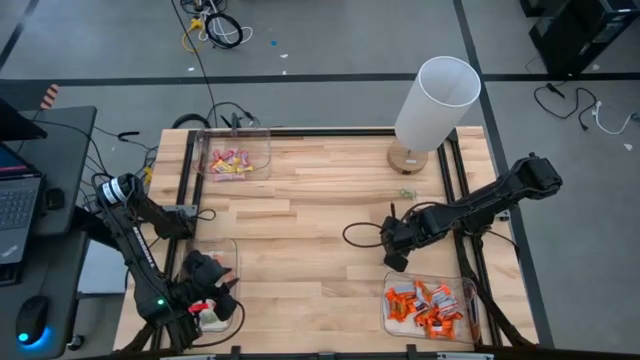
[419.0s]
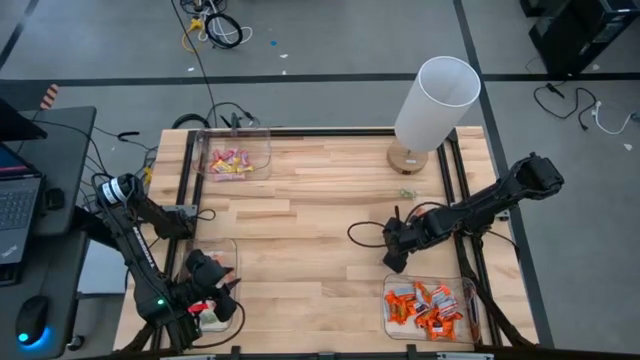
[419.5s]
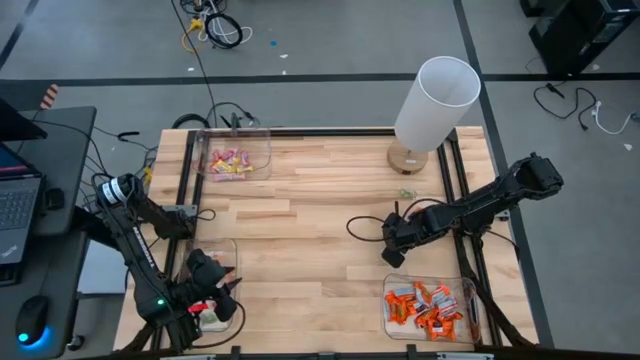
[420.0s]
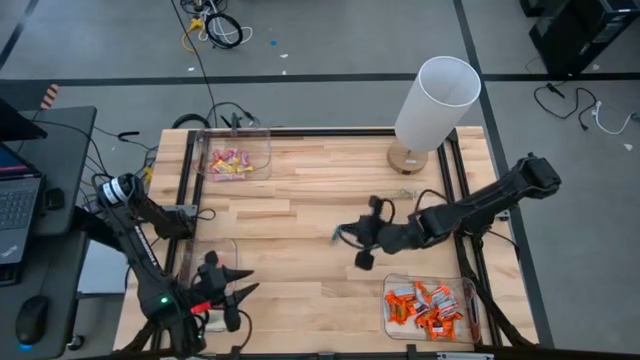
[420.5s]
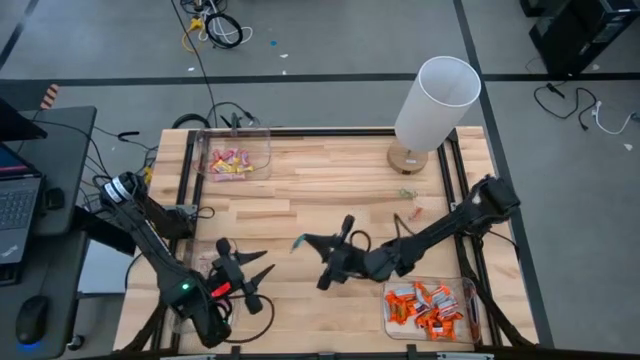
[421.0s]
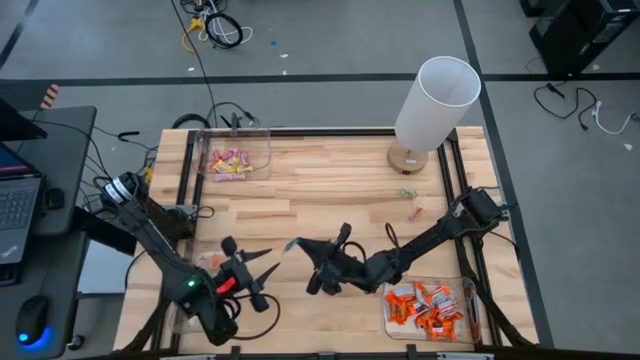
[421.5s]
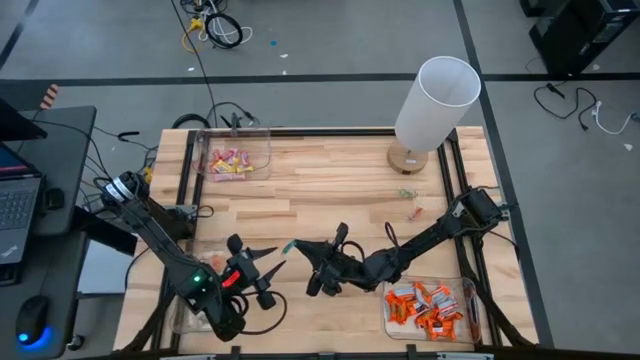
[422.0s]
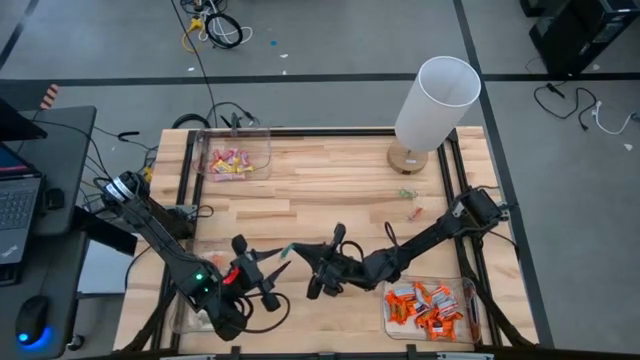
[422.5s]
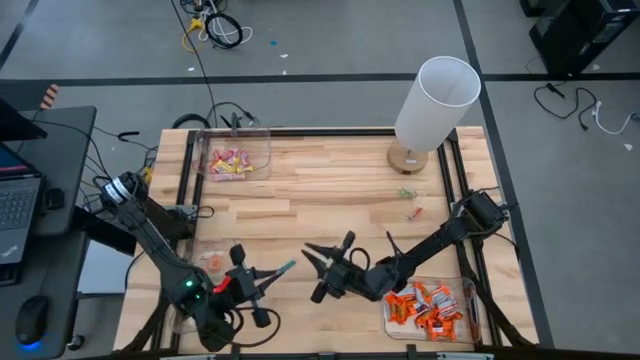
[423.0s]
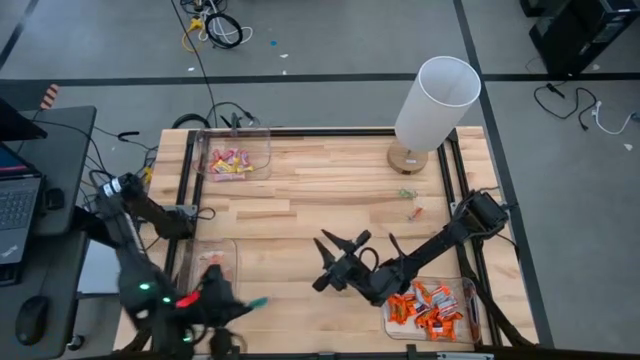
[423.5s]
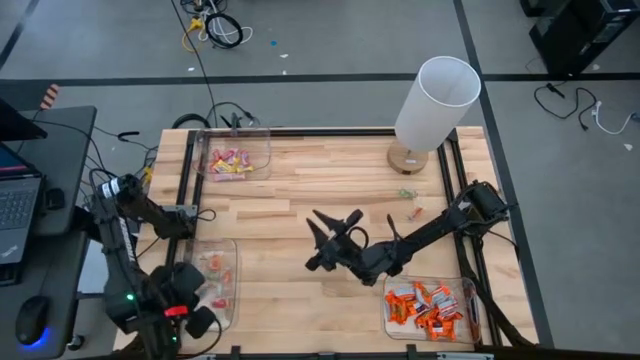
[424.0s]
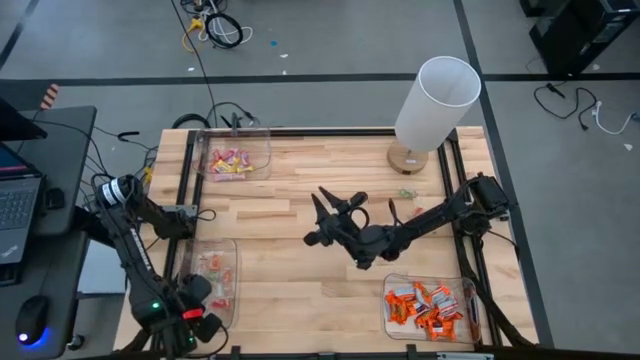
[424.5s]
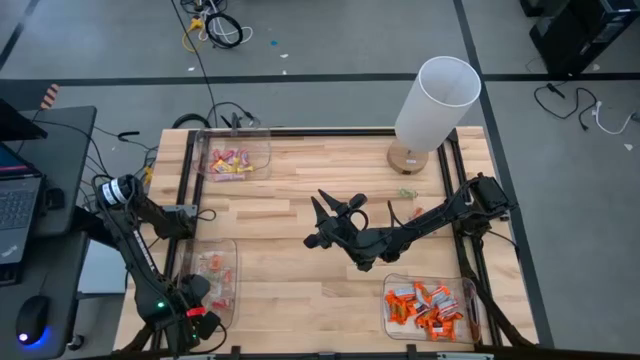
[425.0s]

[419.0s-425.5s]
Task: Sort candy
Put the blue gummy into the bottom left transparent bin

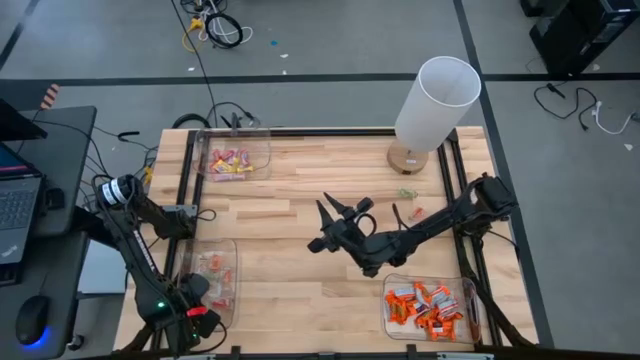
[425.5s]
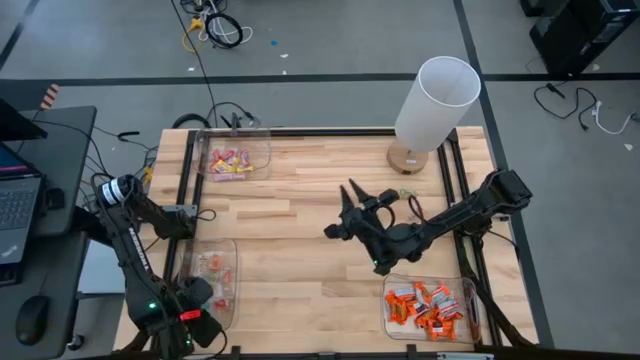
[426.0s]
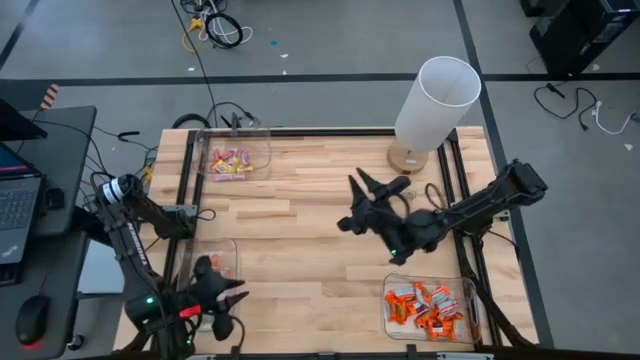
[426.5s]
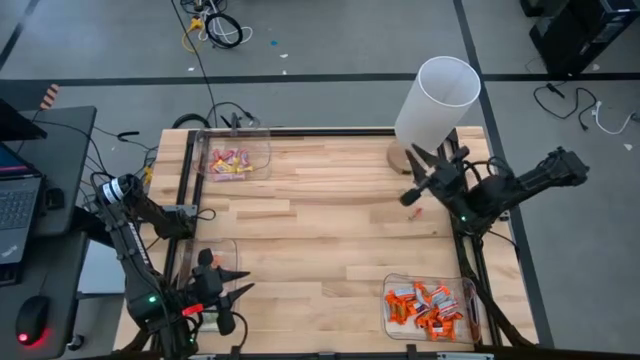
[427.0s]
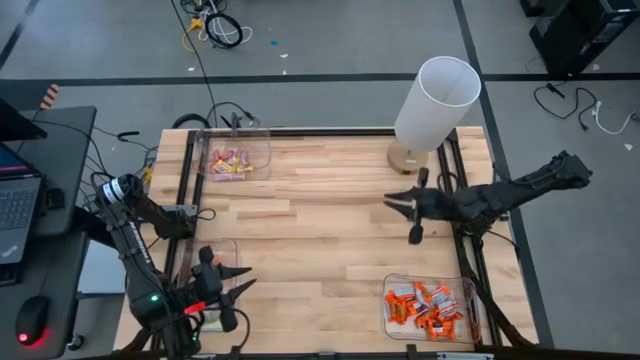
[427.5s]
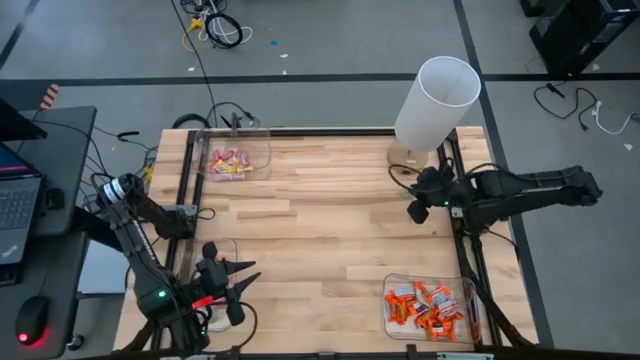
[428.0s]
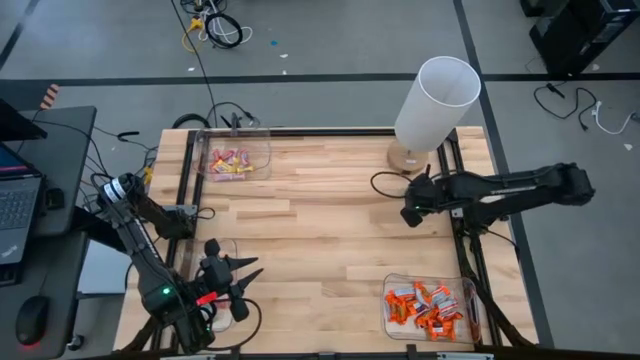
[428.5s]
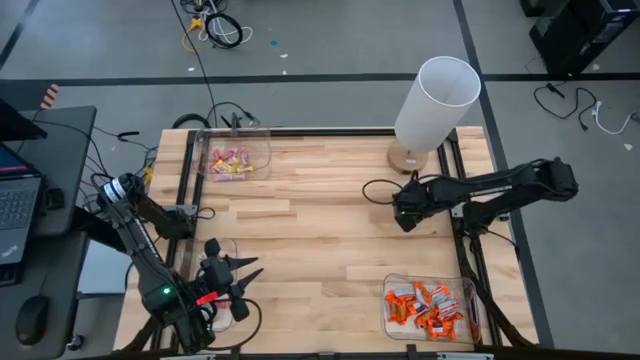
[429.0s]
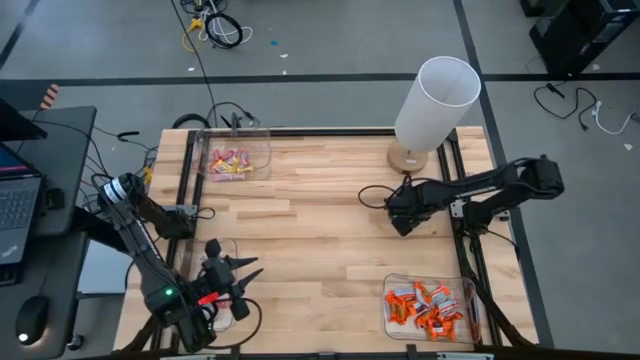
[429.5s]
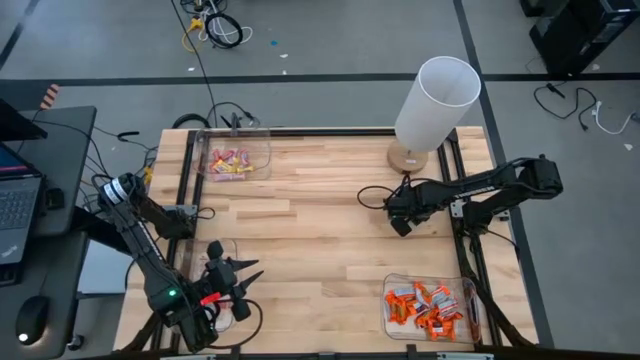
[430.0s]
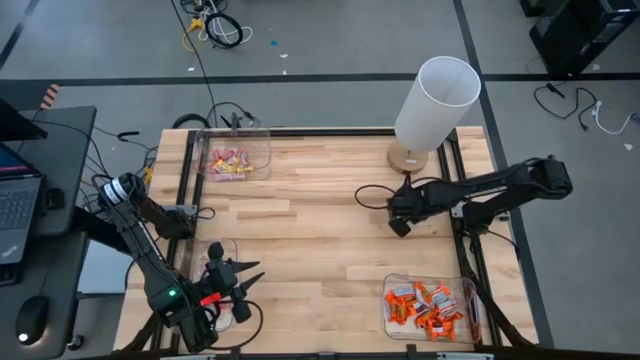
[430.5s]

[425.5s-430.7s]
Put the orange gummy into the bottom left transparent bin

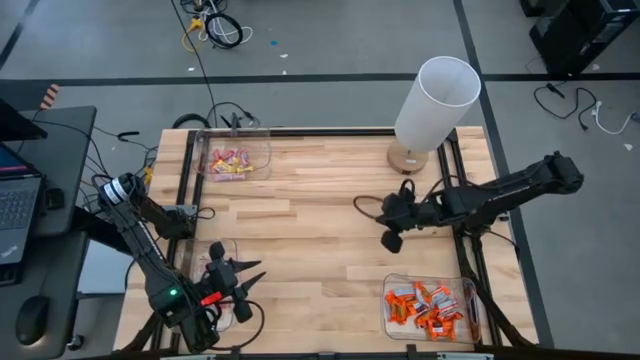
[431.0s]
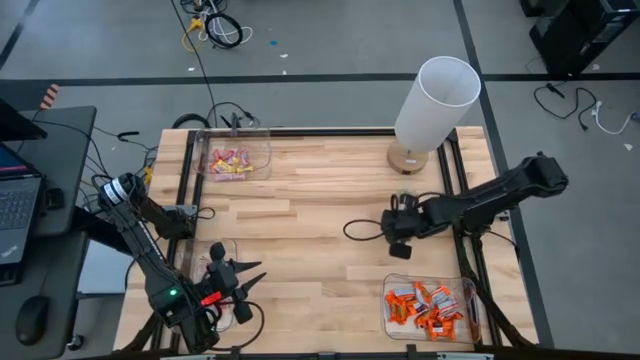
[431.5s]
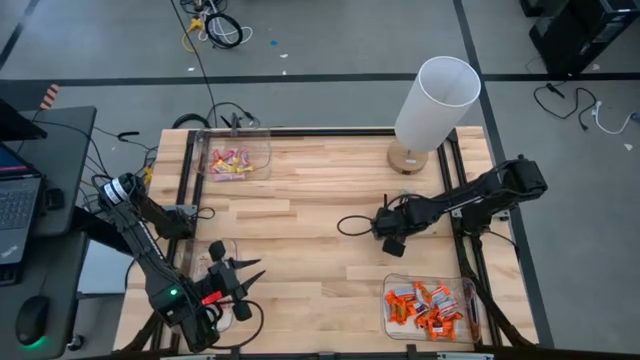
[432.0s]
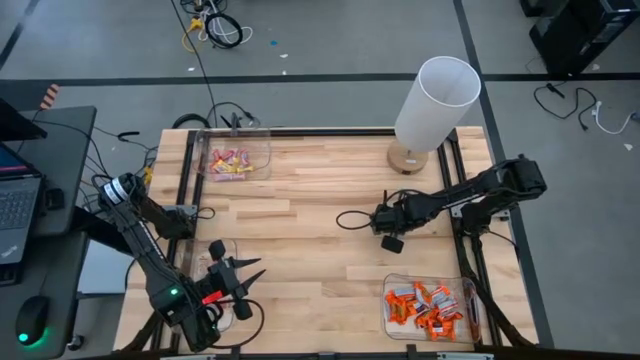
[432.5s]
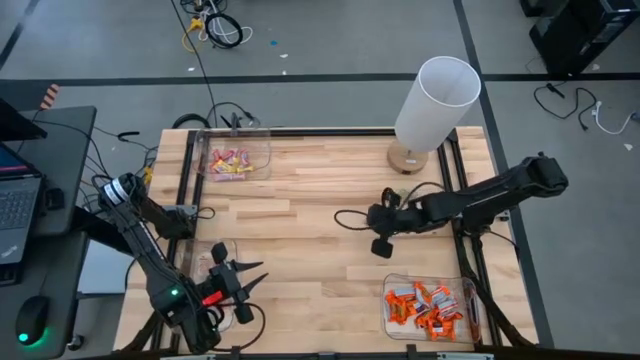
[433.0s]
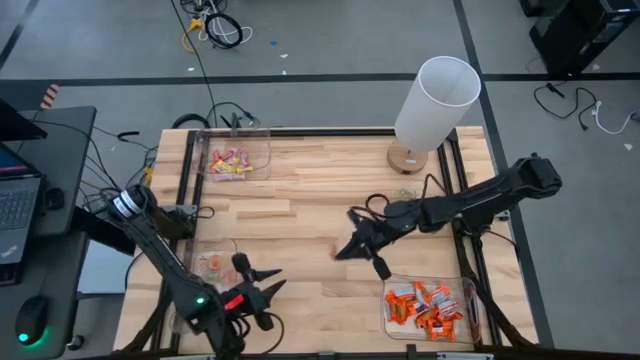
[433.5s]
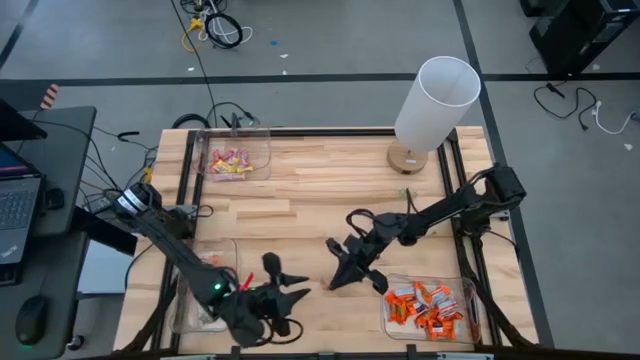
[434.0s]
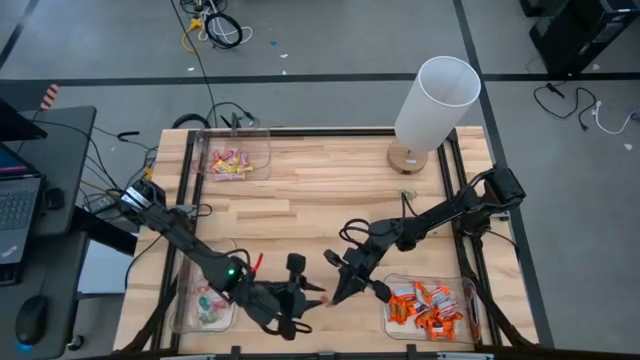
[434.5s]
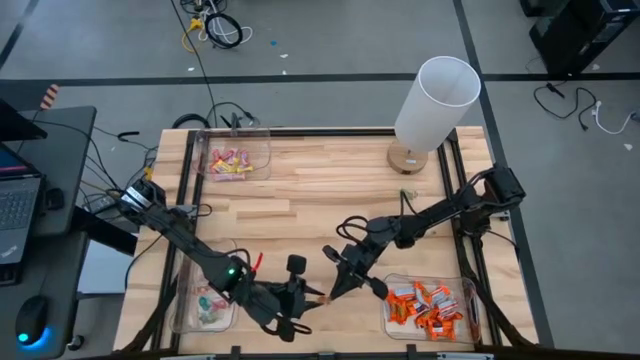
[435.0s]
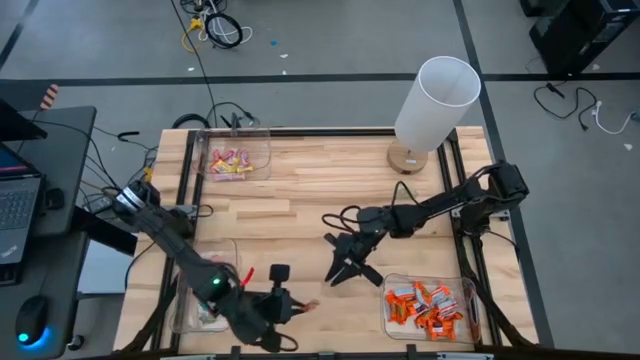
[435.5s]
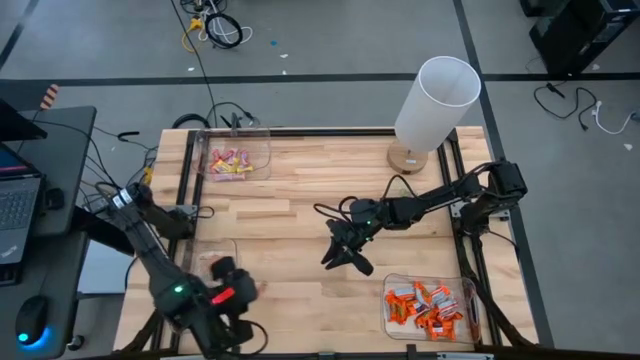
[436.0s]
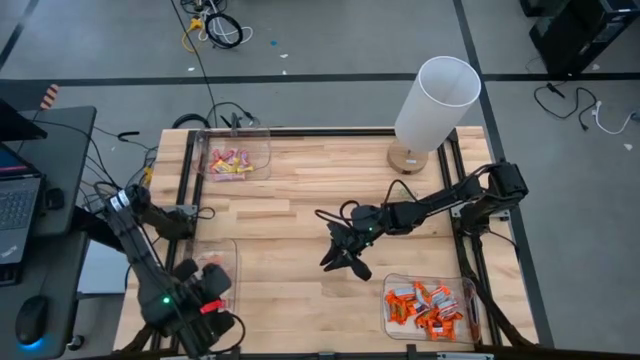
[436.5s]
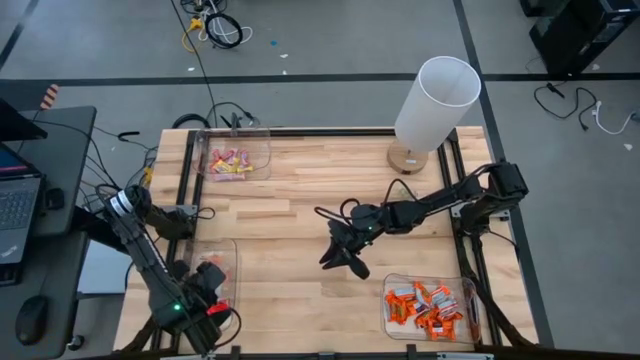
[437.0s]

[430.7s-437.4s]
Put the orange gummy into the bottom left transparent bin

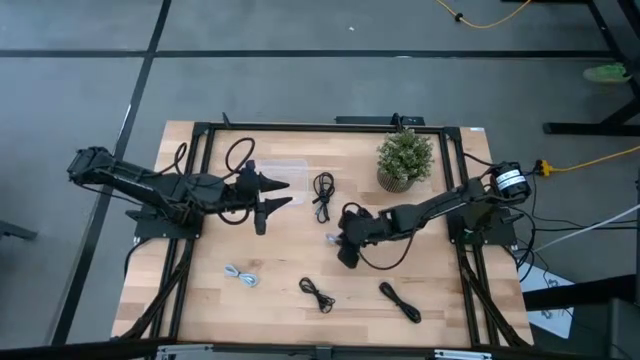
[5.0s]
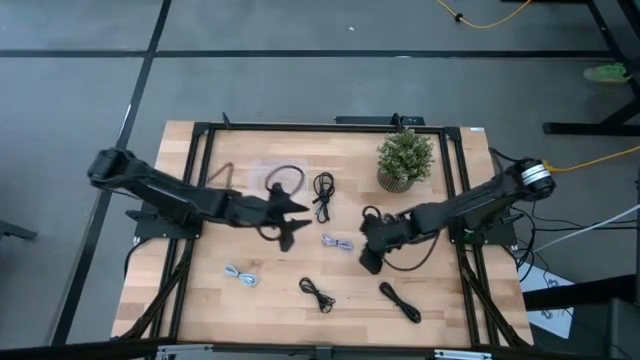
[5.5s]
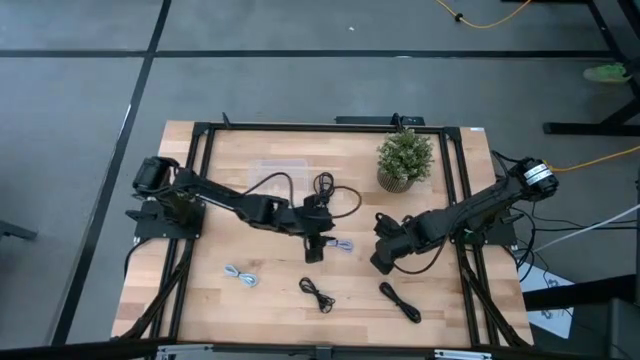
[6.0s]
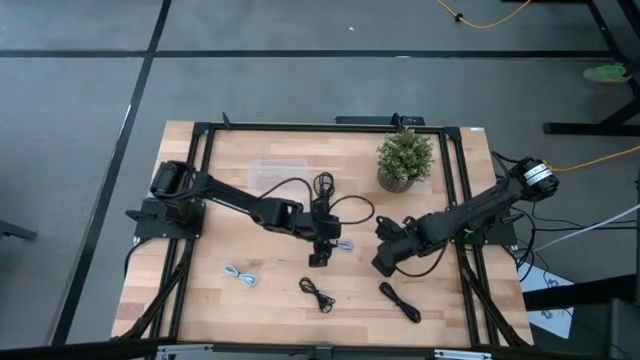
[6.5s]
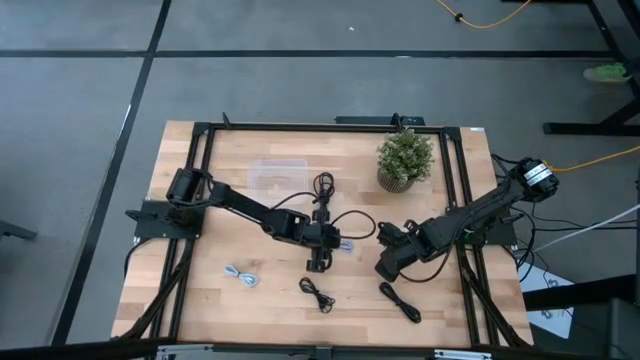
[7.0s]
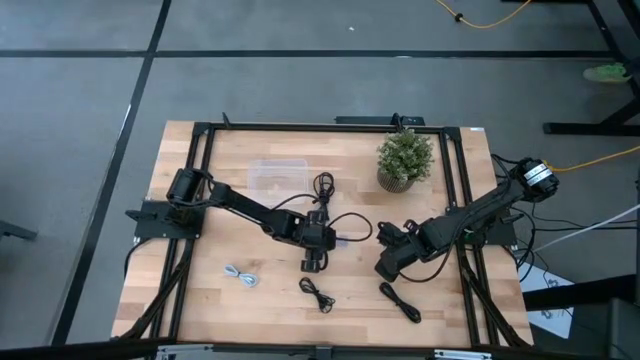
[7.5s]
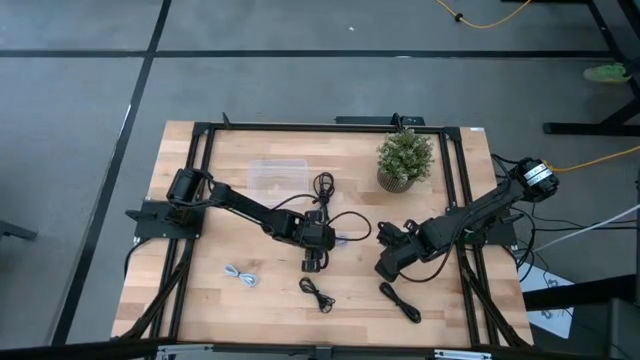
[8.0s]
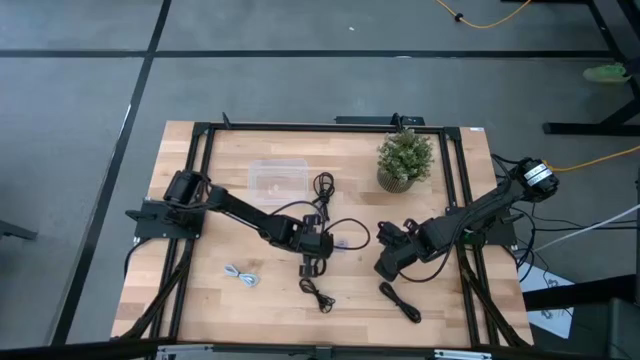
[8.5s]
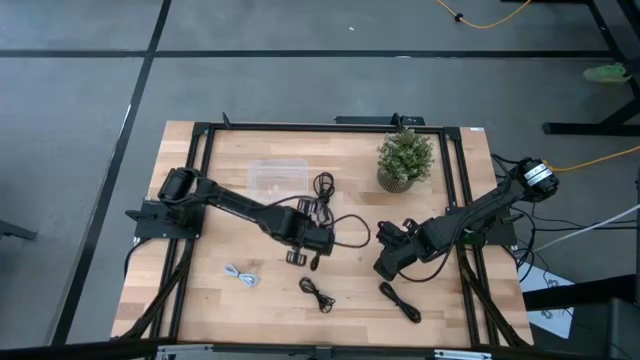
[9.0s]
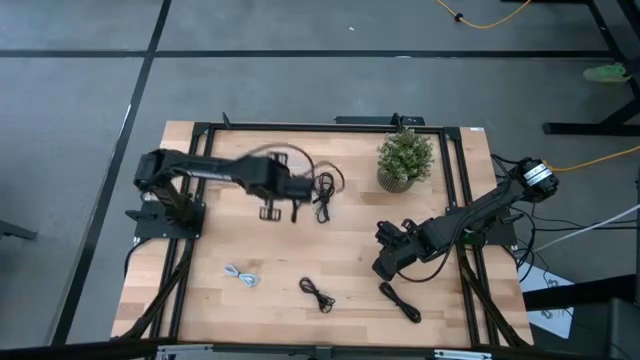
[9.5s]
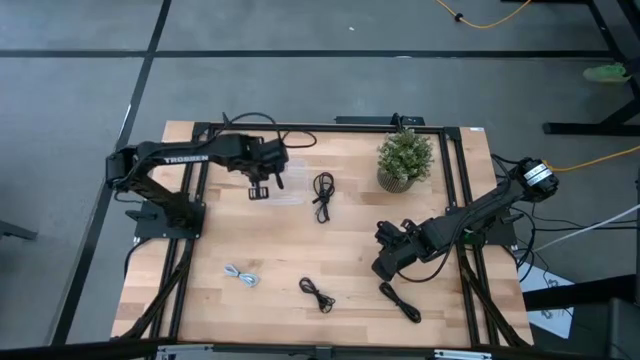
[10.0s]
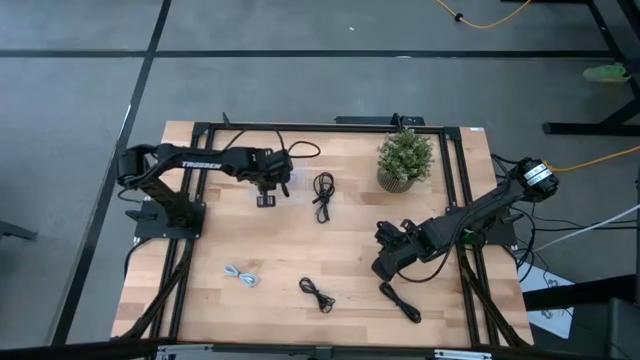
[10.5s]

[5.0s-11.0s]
Task: Pick and place USB-C Cables
Put the purple USB cable into the transparent bin
